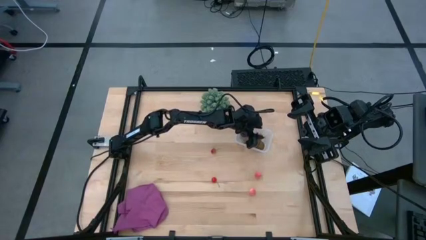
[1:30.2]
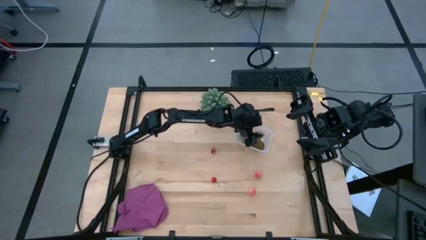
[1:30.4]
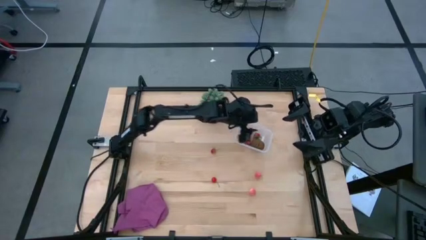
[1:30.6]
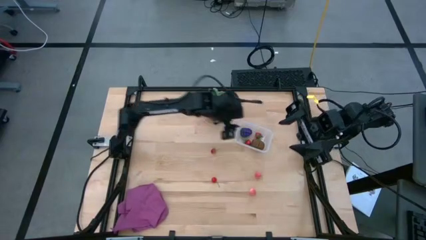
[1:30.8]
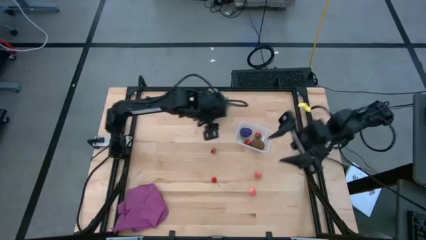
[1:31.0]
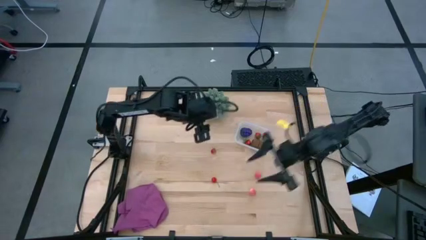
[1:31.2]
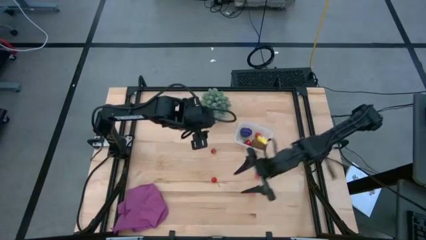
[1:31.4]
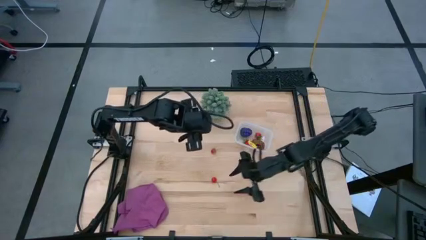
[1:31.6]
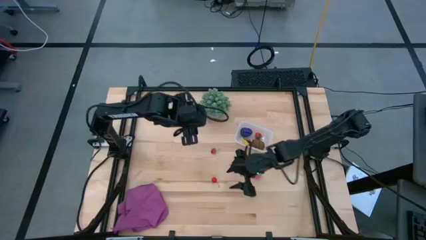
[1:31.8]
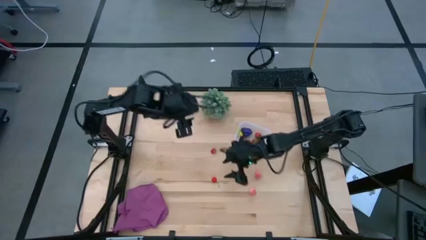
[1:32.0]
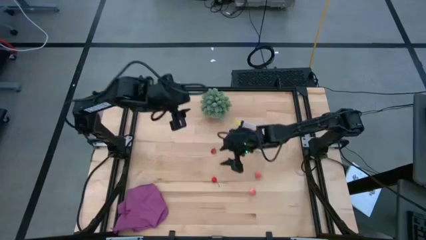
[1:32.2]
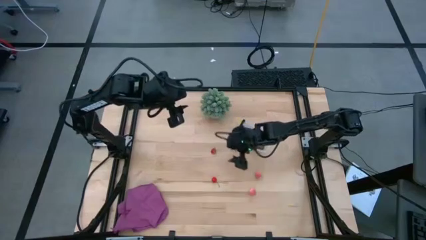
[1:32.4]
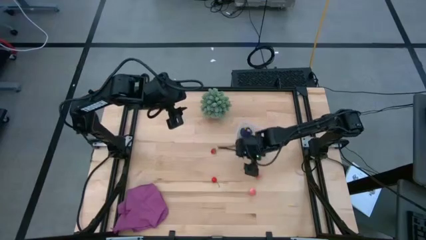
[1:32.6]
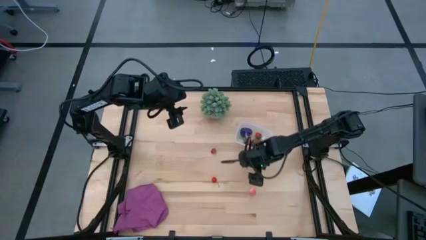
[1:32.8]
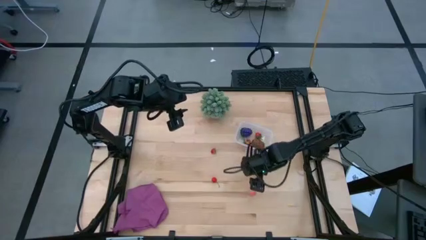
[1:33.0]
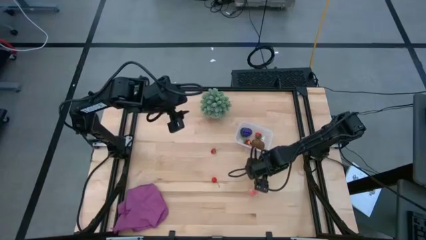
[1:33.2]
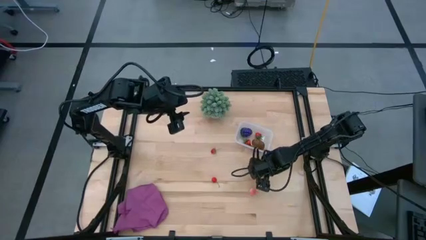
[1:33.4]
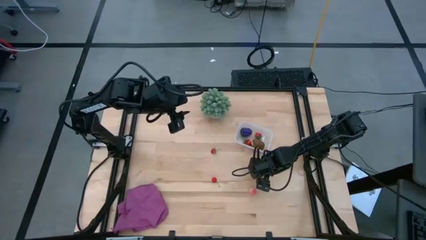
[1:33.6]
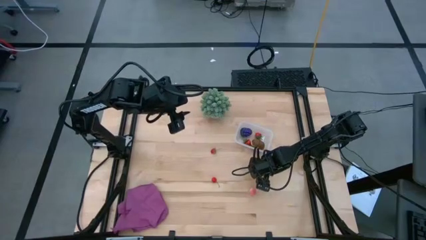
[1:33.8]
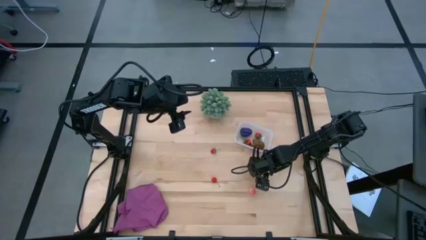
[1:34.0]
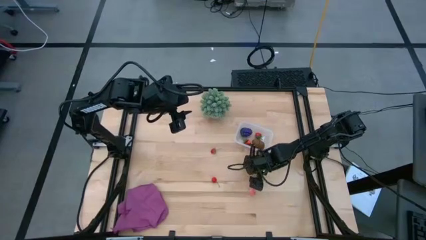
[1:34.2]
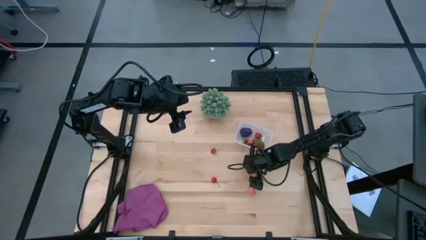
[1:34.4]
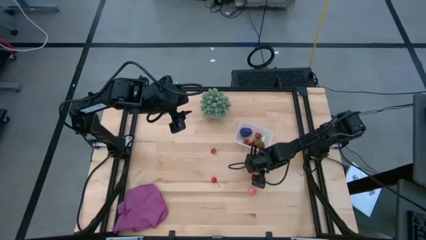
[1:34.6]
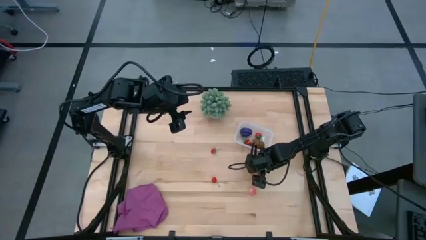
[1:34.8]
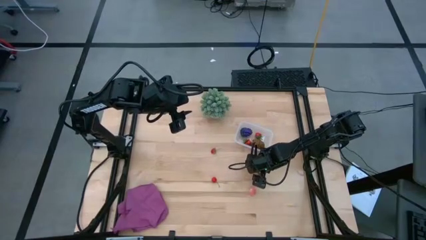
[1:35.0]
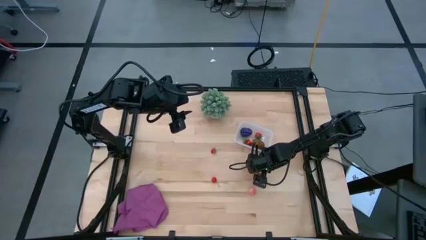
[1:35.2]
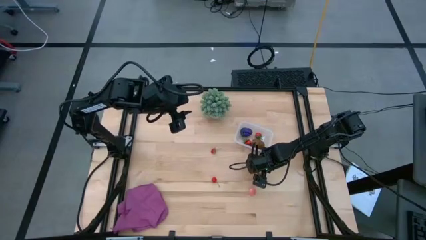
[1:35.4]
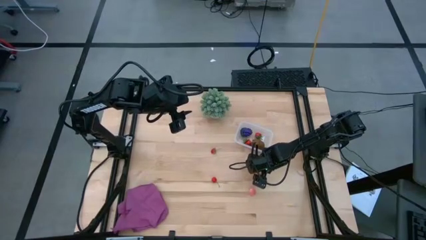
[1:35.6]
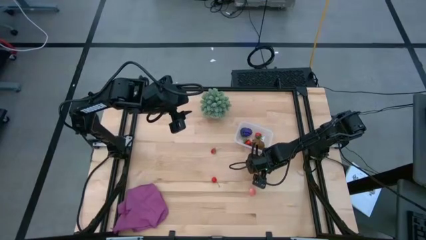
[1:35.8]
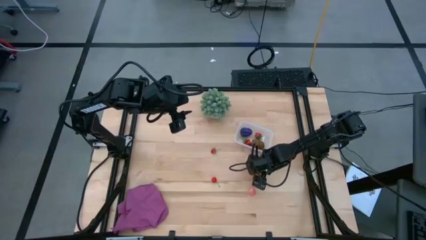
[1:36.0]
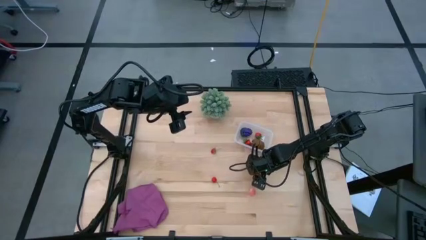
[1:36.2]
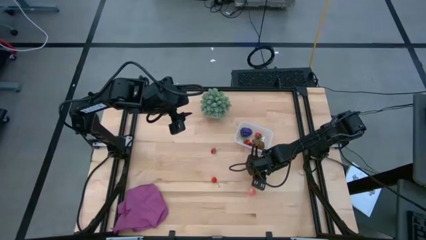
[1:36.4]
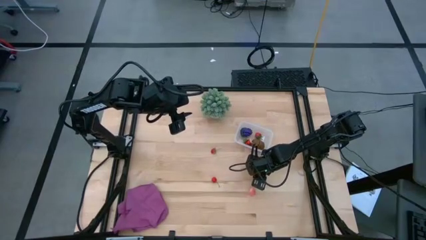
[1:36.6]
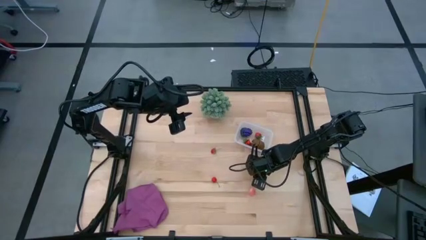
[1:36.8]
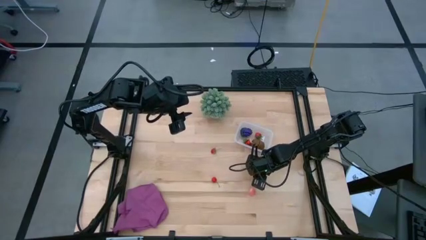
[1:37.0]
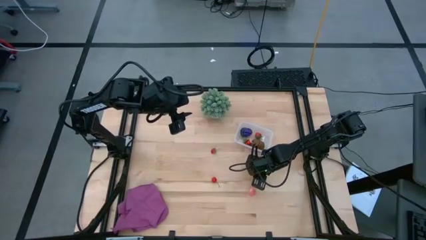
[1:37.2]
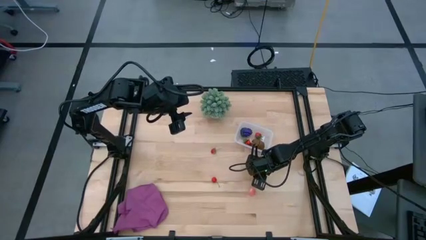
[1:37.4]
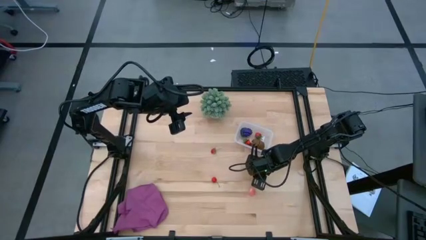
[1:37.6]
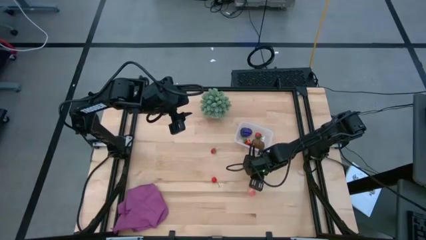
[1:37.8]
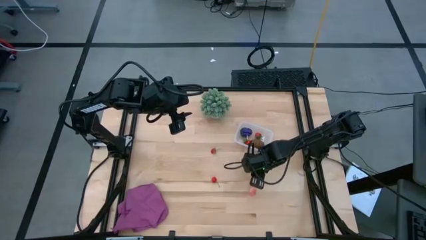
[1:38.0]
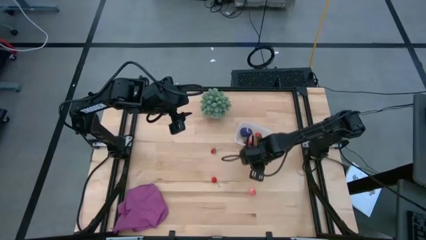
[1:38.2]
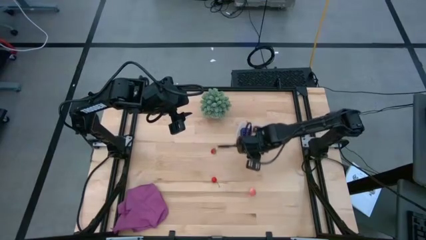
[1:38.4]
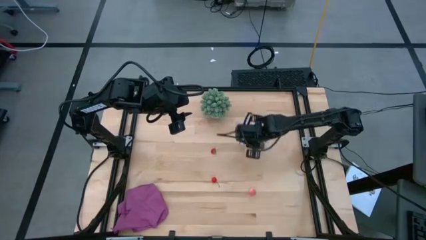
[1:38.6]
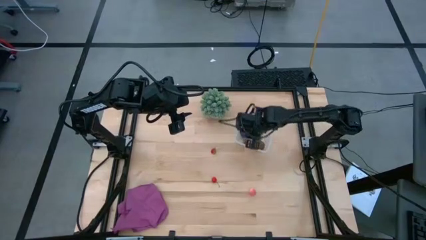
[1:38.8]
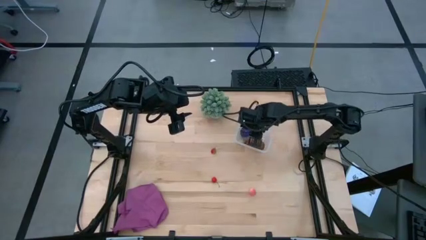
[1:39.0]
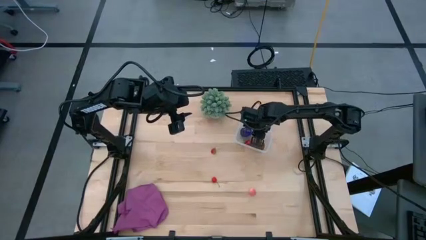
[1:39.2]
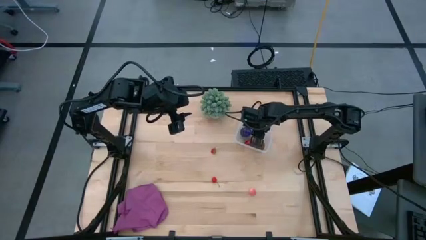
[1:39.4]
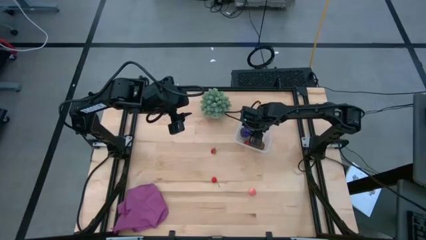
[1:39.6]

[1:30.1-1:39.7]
Task: Pick and placing Produce into tupperware
Put the pink peach into the transparent bin

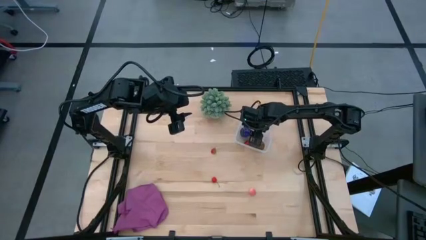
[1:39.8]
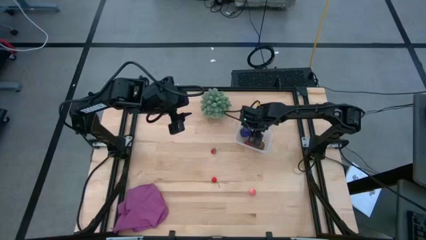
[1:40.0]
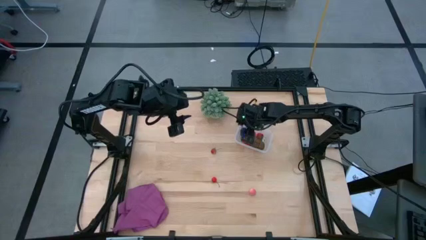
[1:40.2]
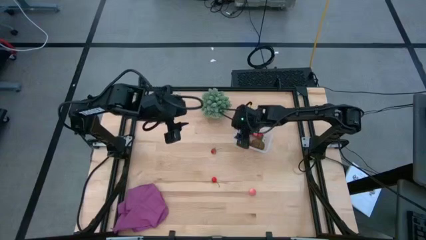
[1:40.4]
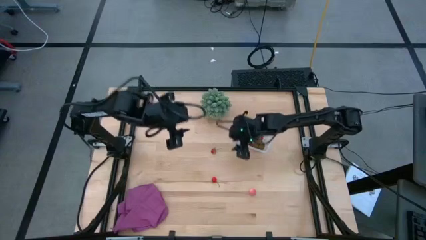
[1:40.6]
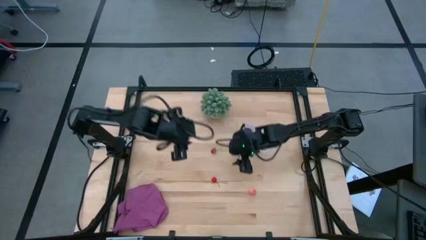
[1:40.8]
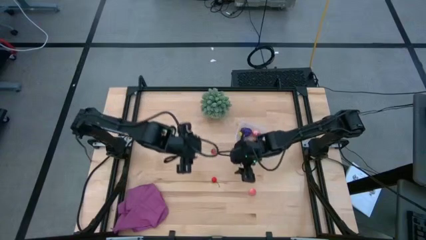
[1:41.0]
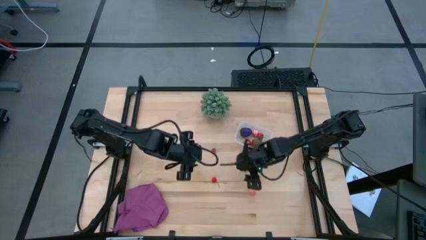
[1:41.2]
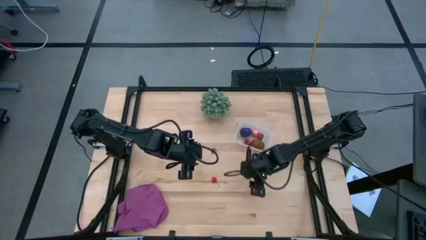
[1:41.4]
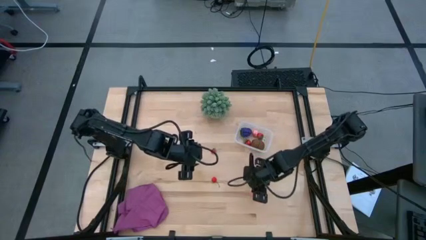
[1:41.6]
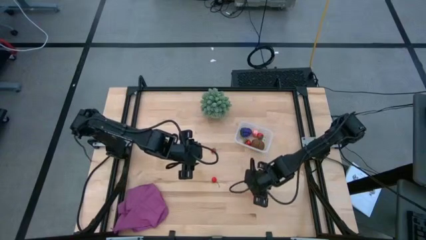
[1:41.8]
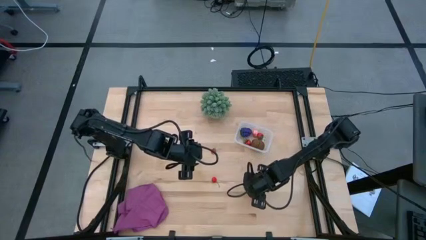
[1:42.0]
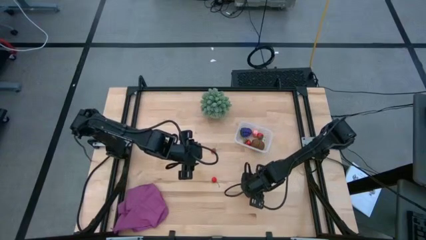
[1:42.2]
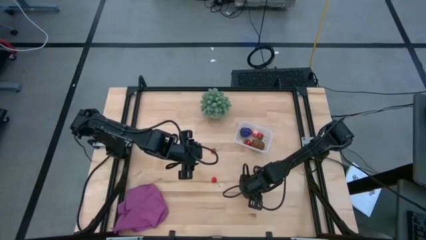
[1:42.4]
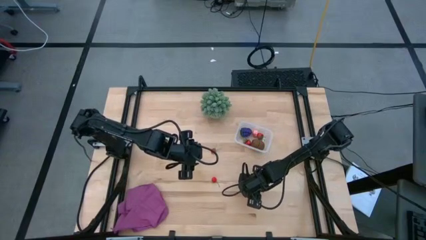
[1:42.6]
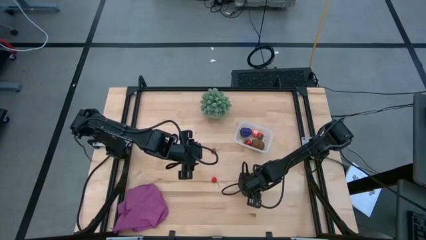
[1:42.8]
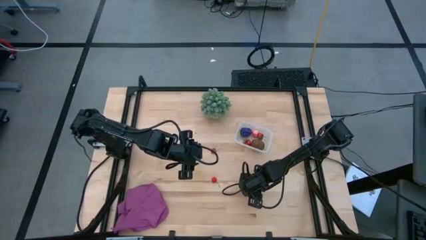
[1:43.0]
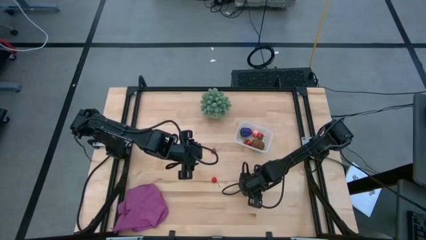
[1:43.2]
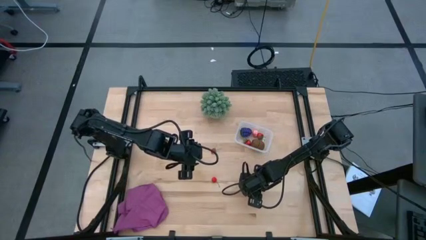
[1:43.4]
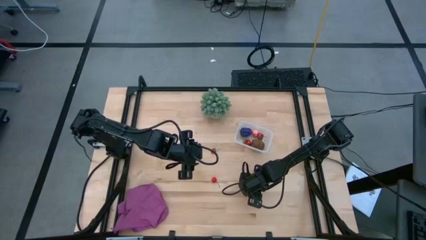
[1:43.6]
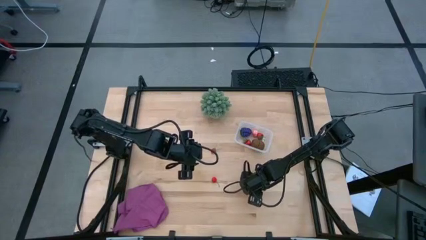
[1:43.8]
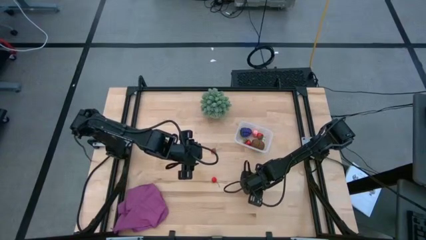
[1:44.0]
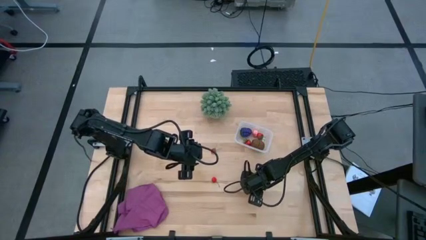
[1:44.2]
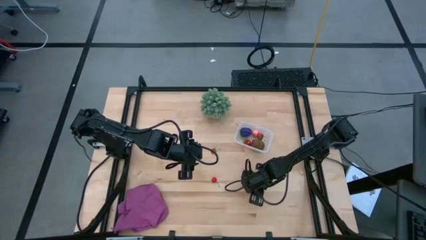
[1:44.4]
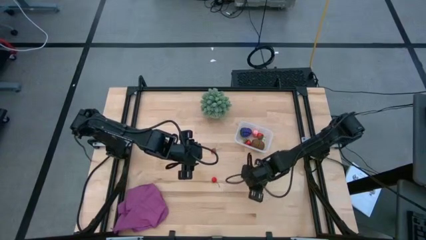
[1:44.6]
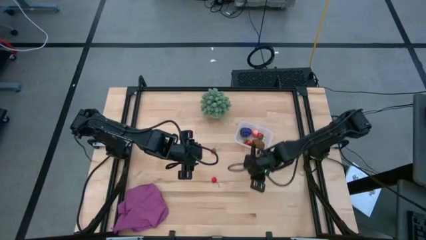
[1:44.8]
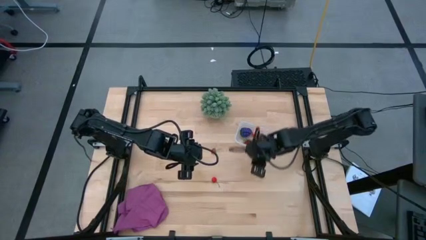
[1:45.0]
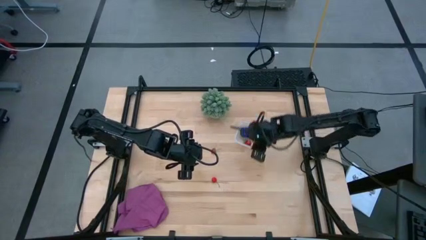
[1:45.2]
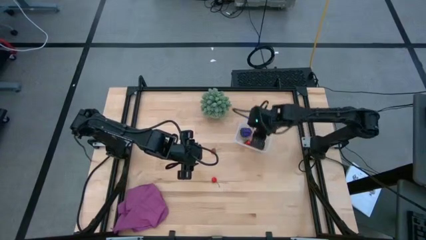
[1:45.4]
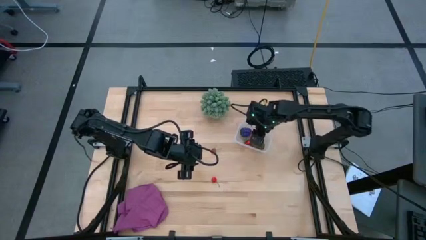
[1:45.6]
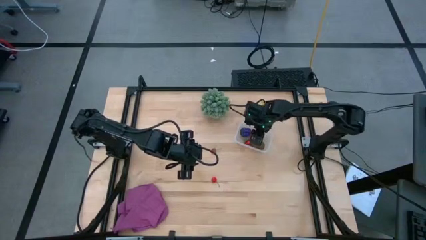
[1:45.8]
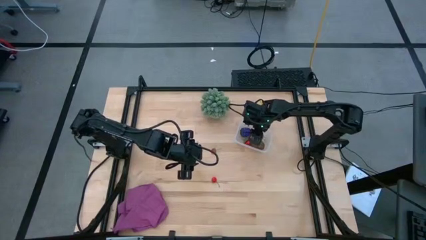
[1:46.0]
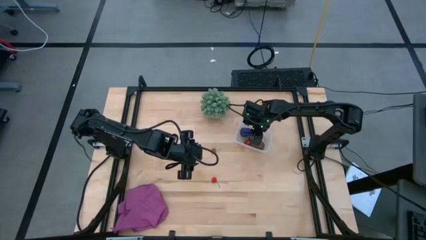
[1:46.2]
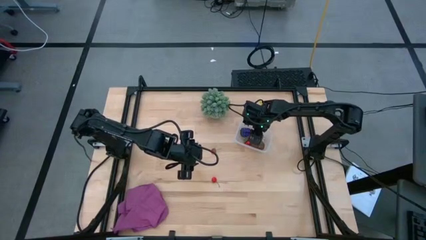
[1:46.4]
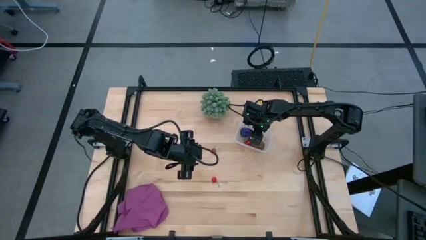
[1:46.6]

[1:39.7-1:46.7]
Put the pink peach into the transparent bin
